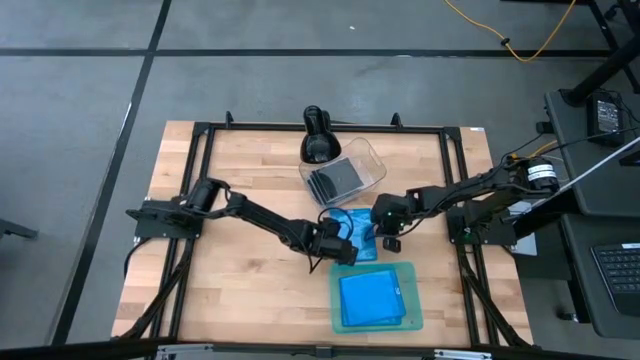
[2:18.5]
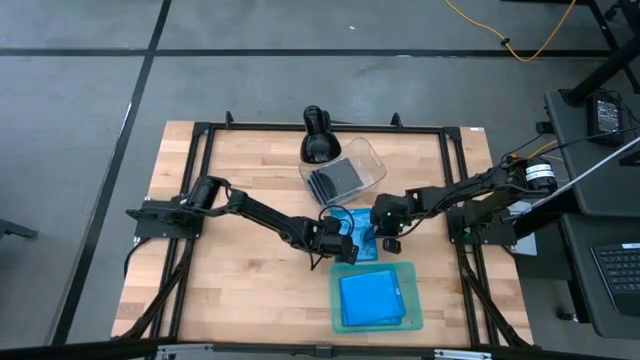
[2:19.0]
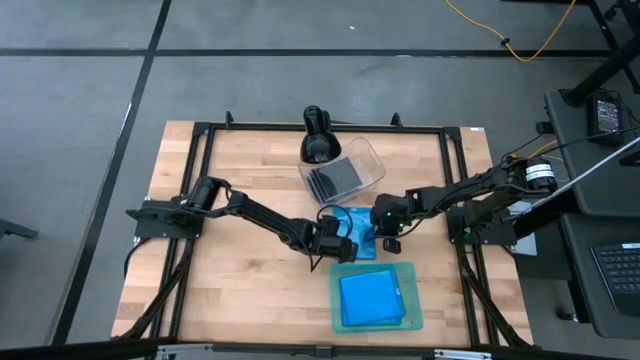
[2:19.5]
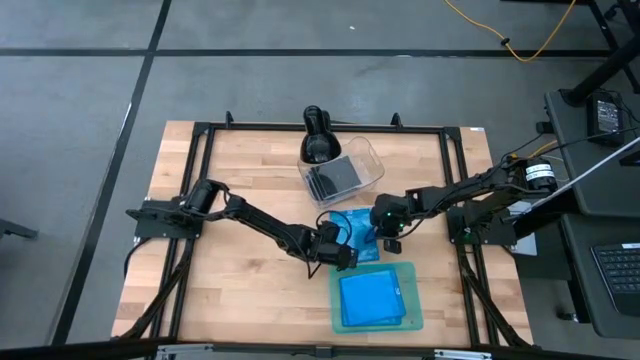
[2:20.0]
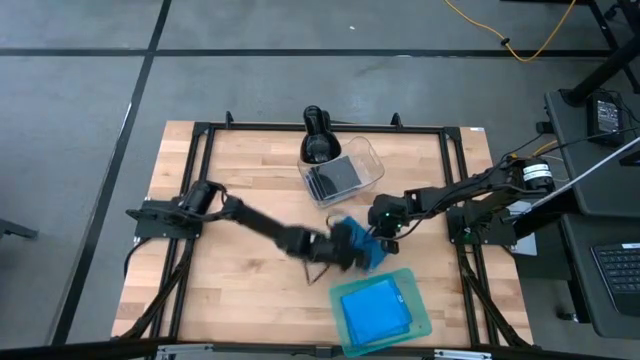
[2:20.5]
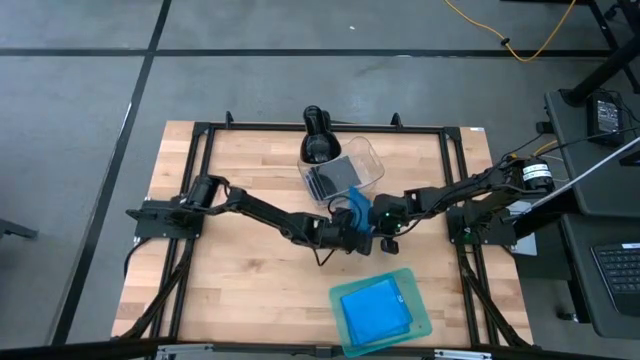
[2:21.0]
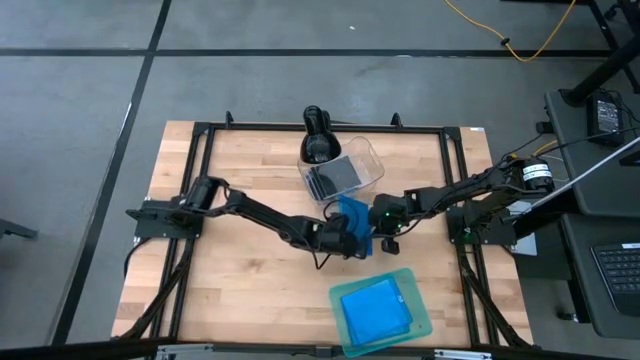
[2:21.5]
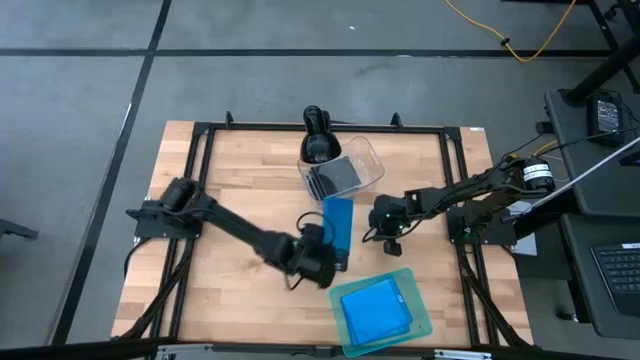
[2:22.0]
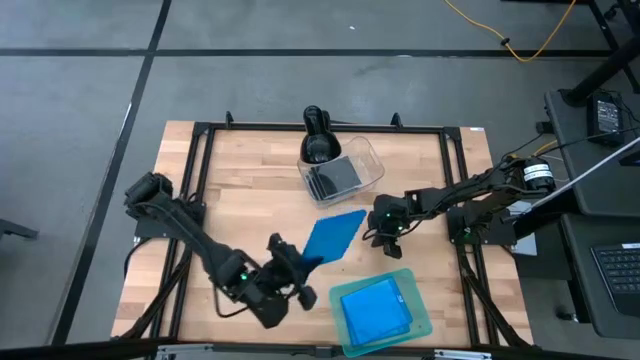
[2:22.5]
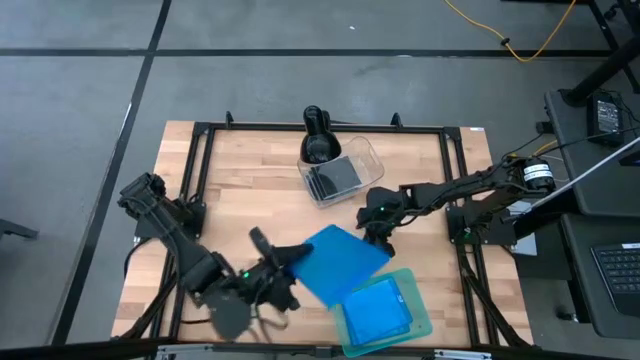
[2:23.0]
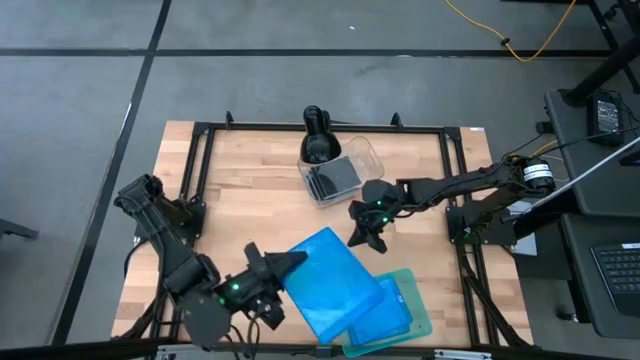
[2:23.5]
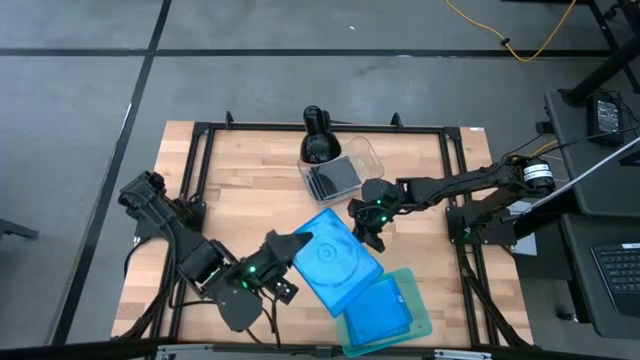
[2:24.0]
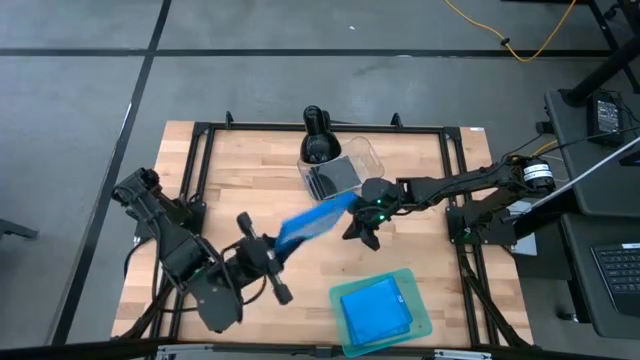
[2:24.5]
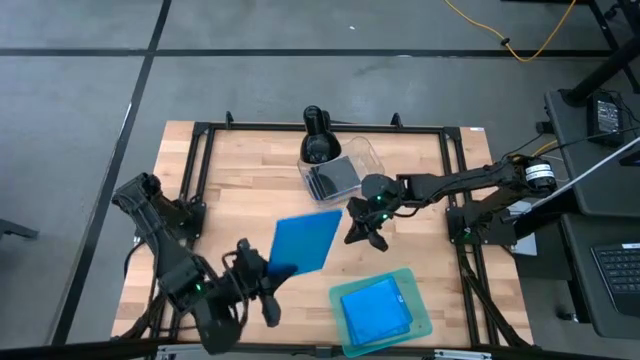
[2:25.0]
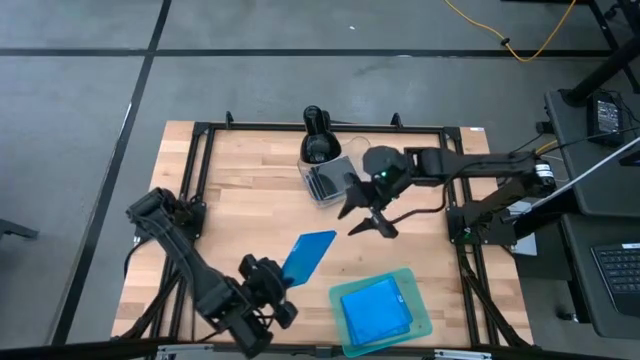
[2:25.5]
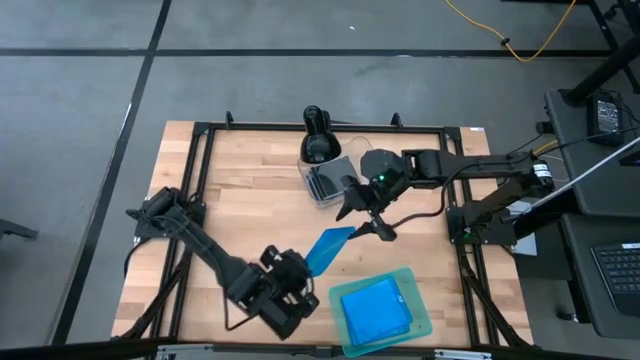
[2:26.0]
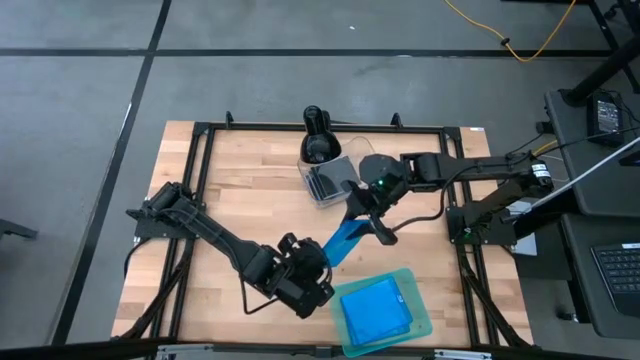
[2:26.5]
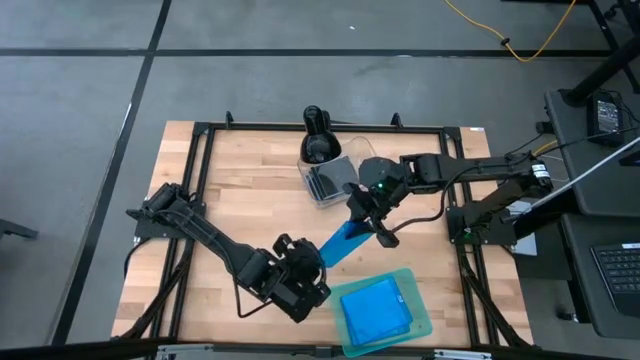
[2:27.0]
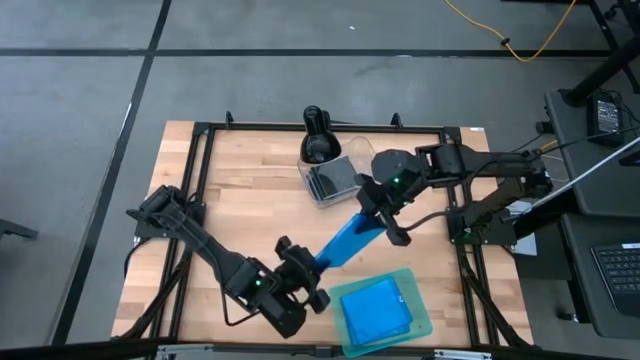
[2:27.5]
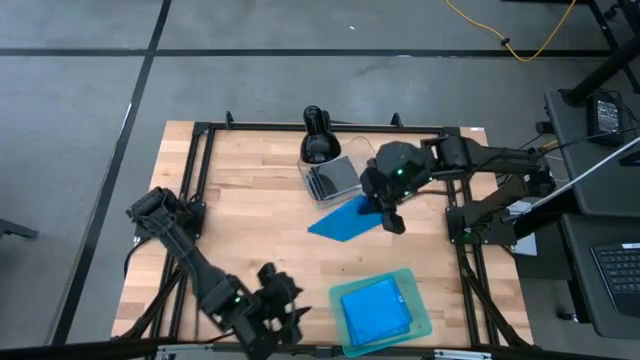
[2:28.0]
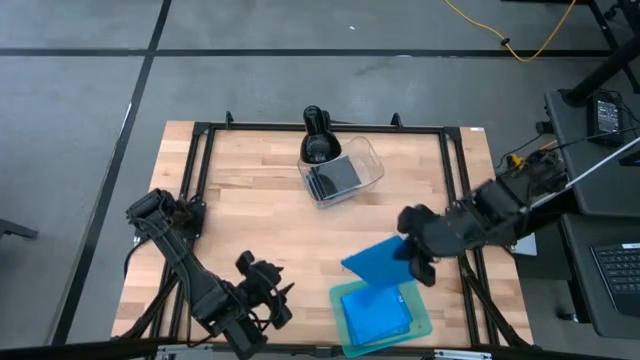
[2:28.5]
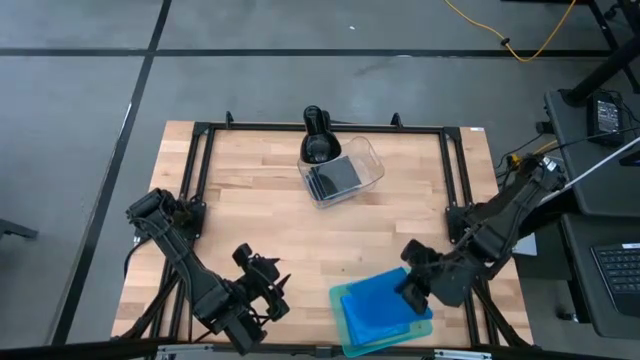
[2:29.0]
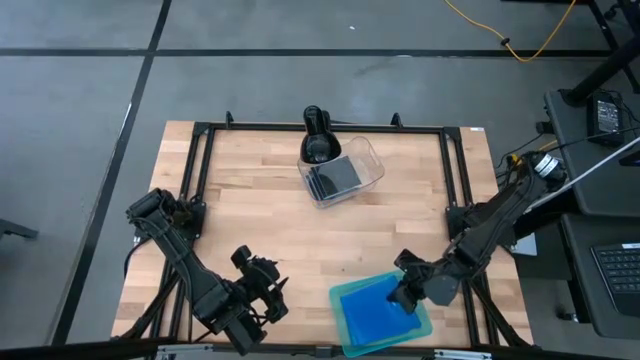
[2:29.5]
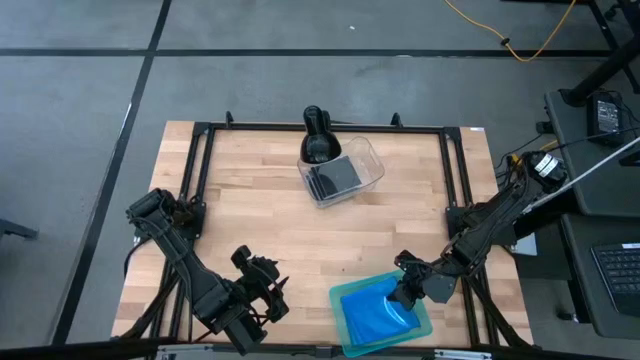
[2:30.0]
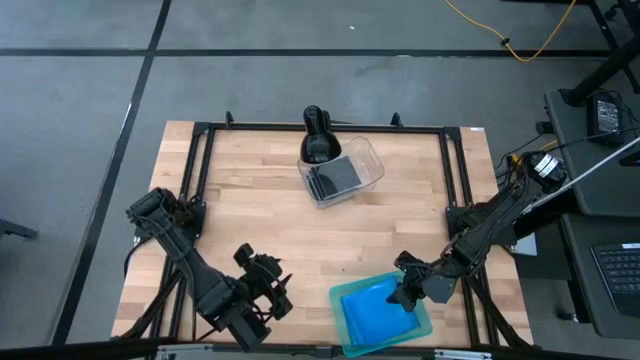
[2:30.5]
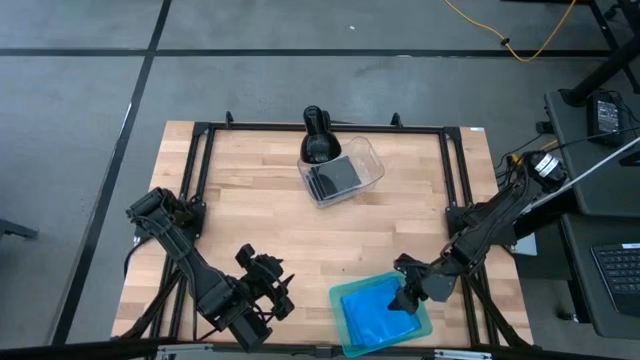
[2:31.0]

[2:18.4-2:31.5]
Task: Pick & place jewel cases by type
Put the blue CD case into the light green bin

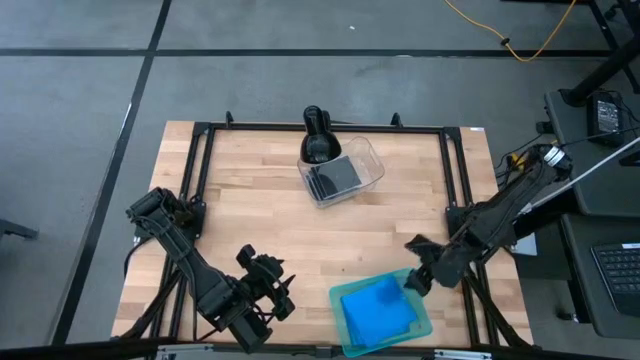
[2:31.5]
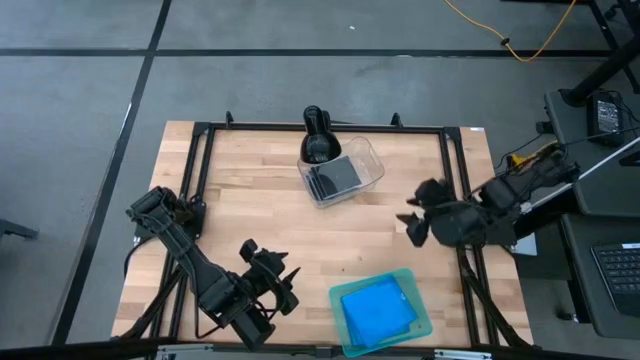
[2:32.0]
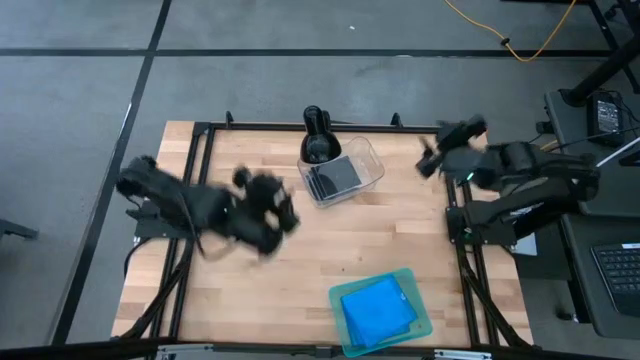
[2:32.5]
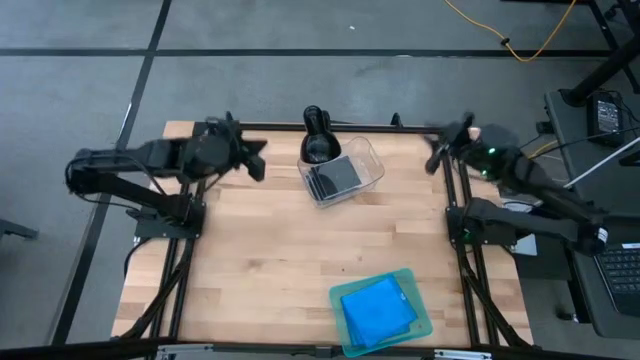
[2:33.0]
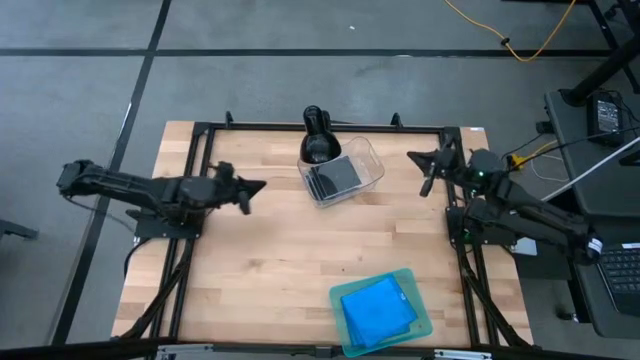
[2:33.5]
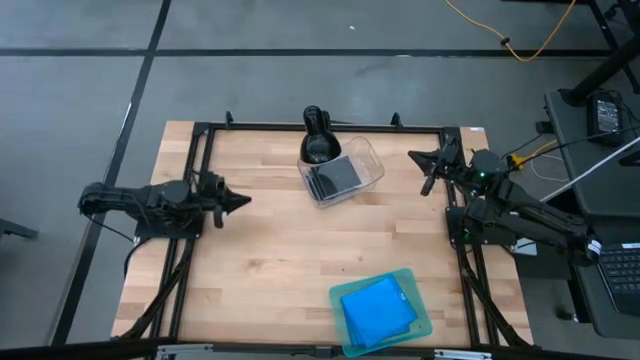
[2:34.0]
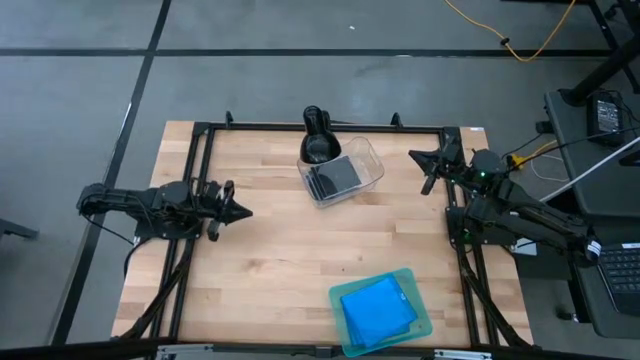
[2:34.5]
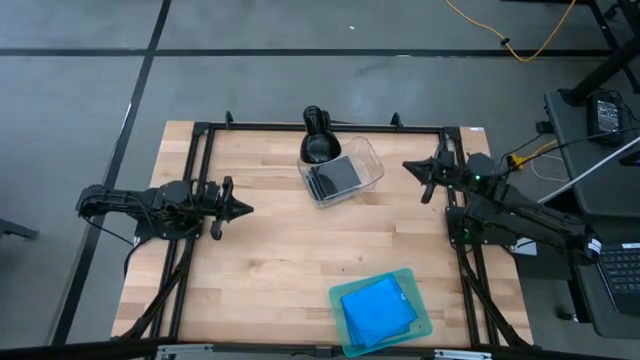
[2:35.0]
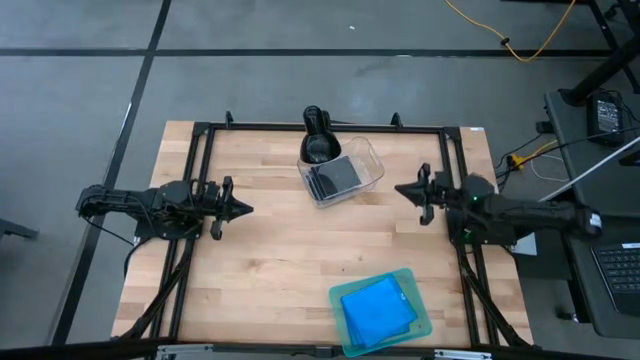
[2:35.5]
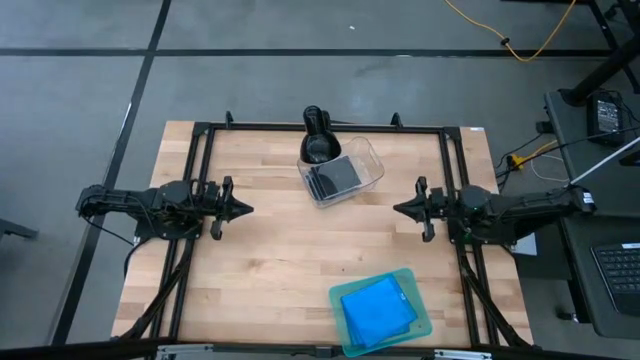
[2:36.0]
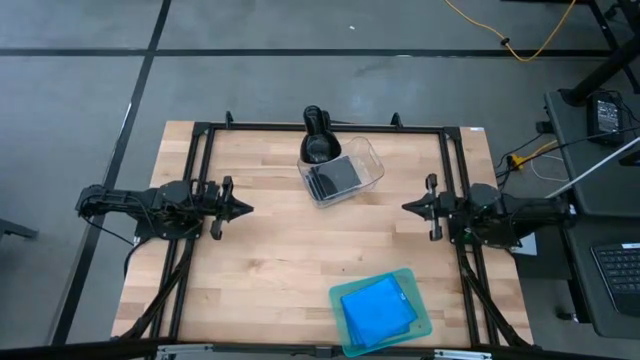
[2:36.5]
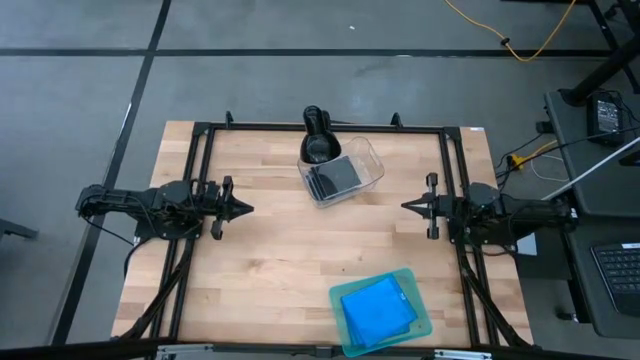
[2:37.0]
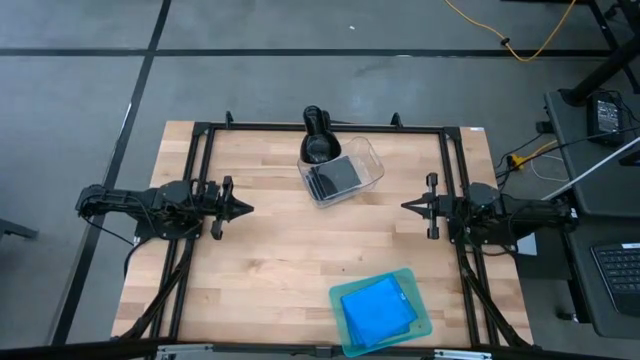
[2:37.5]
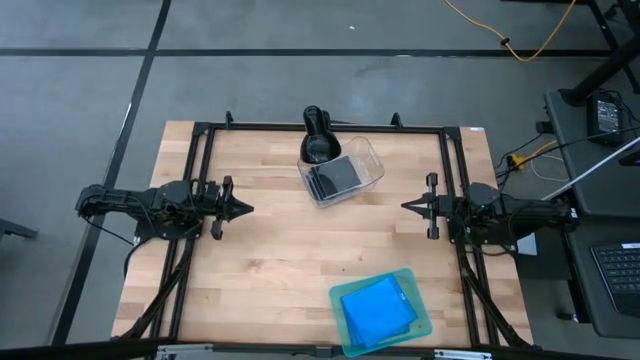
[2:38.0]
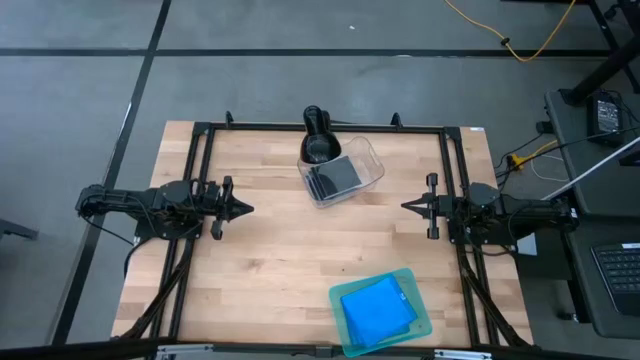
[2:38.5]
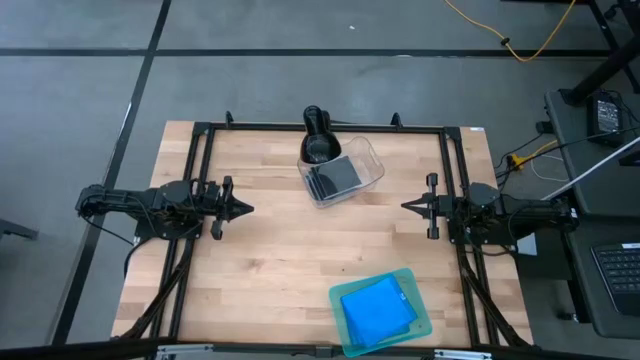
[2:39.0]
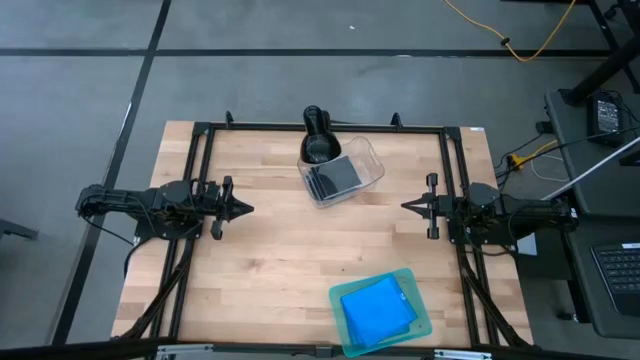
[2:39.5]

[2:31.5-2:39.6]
Return to Home Position
